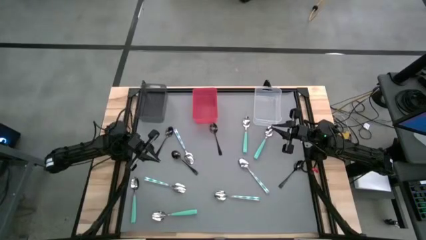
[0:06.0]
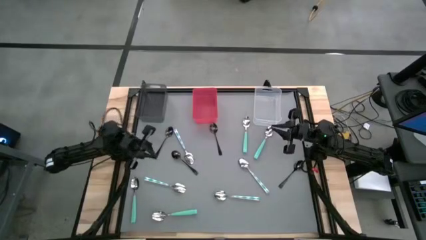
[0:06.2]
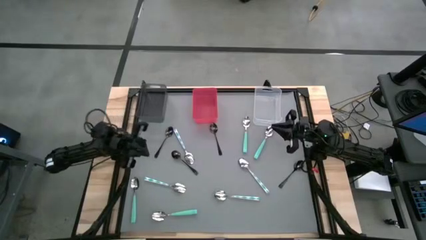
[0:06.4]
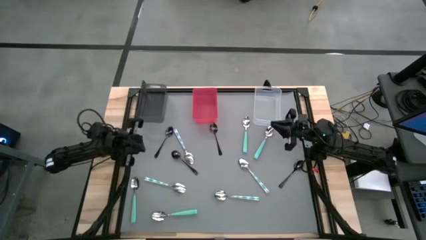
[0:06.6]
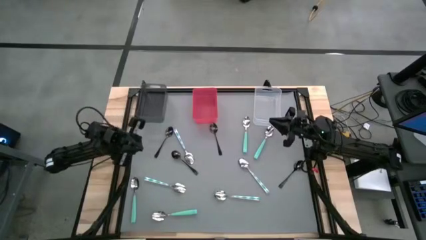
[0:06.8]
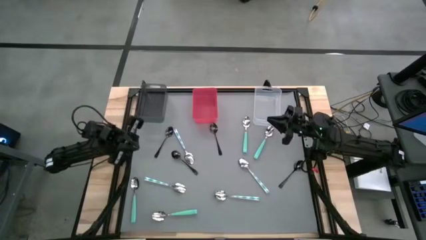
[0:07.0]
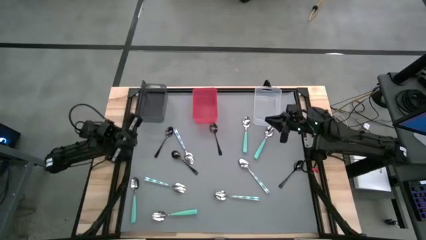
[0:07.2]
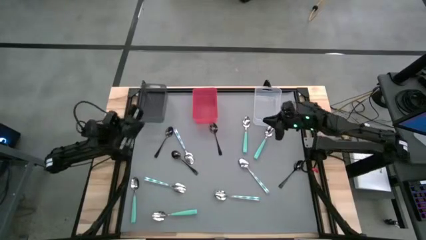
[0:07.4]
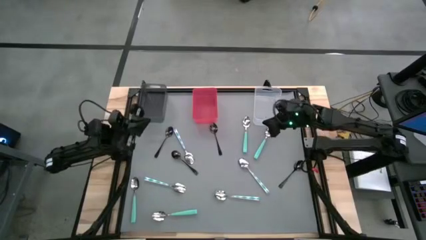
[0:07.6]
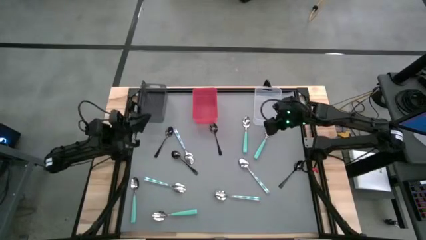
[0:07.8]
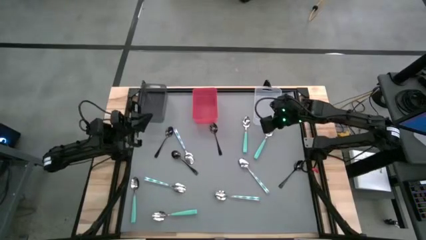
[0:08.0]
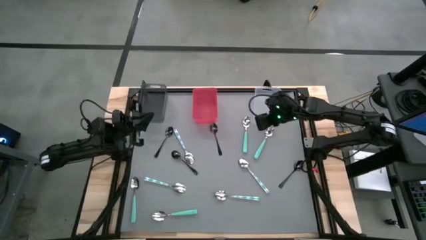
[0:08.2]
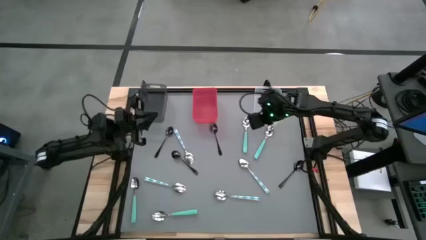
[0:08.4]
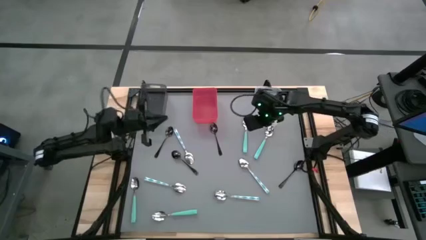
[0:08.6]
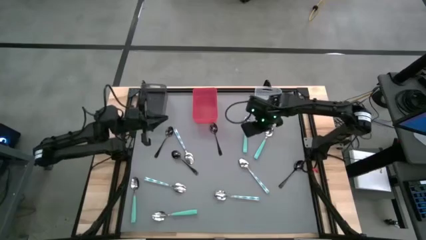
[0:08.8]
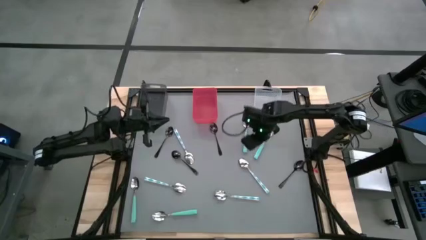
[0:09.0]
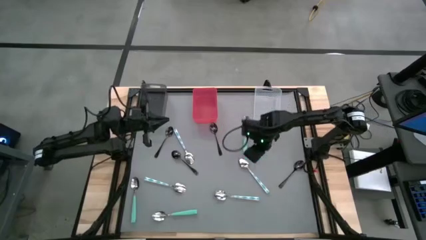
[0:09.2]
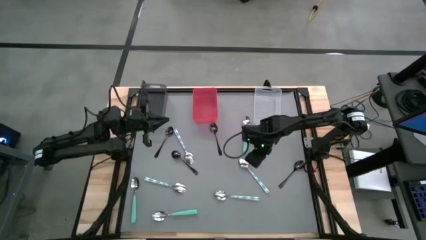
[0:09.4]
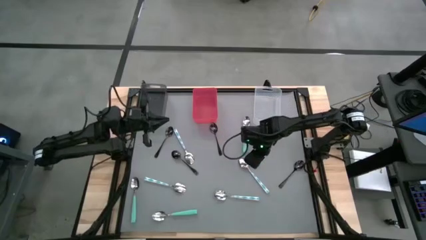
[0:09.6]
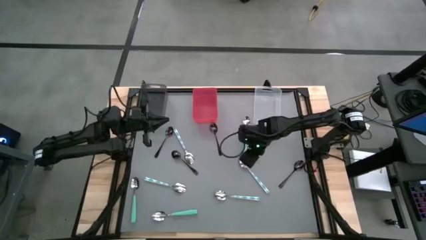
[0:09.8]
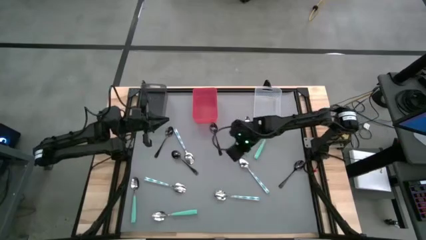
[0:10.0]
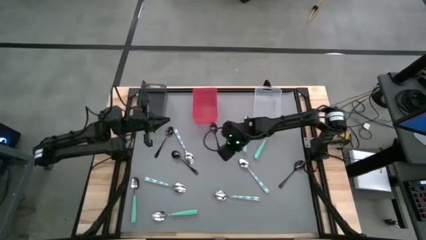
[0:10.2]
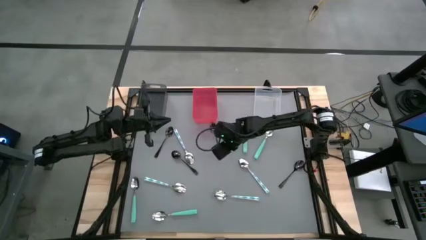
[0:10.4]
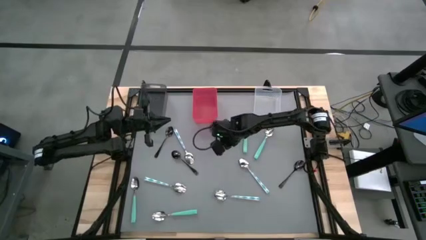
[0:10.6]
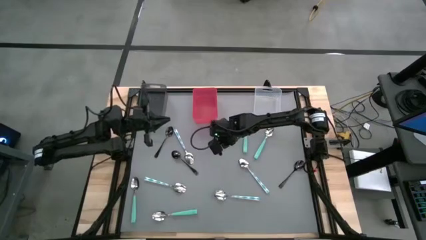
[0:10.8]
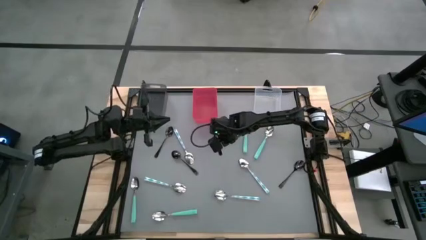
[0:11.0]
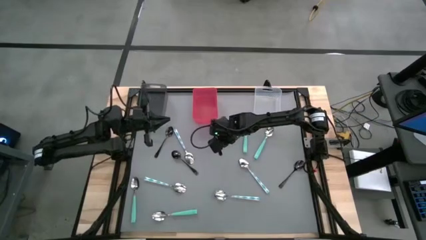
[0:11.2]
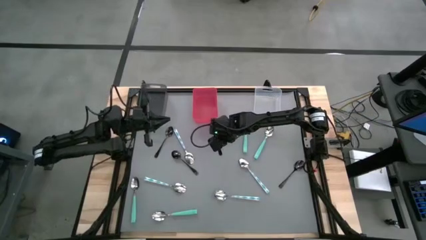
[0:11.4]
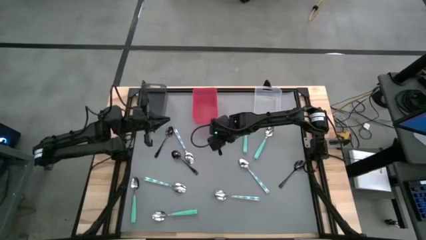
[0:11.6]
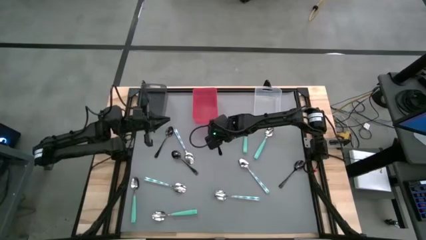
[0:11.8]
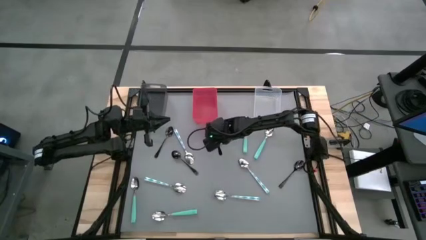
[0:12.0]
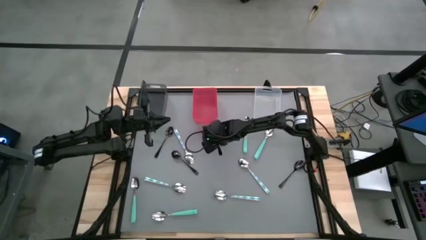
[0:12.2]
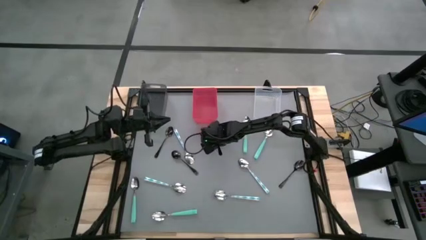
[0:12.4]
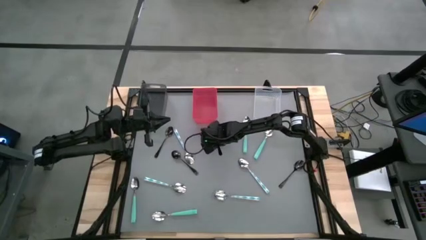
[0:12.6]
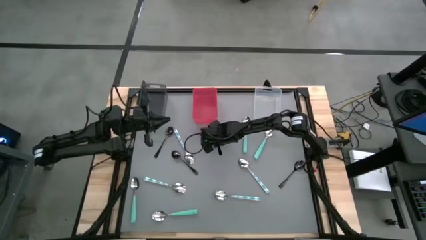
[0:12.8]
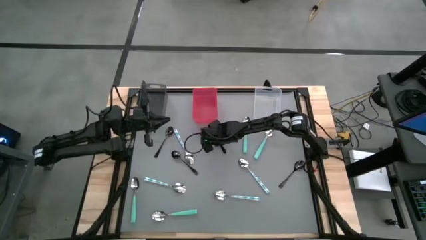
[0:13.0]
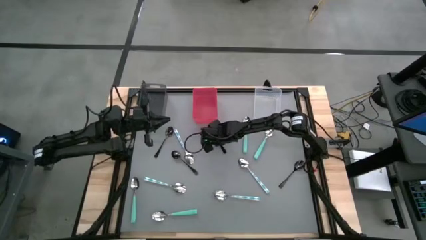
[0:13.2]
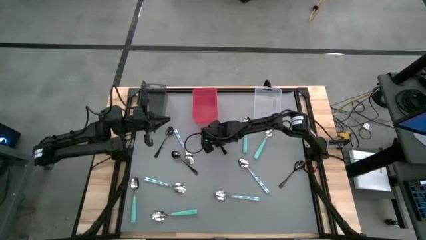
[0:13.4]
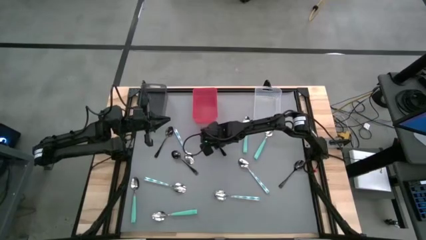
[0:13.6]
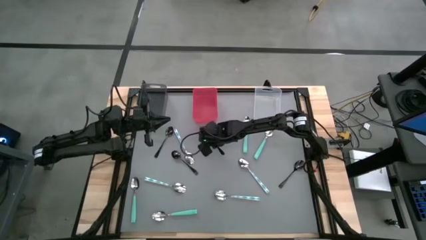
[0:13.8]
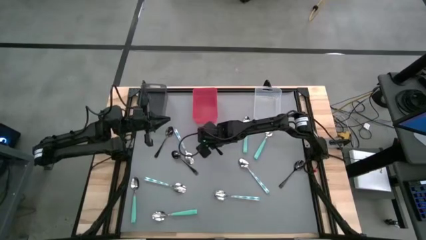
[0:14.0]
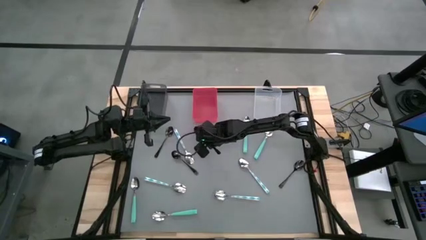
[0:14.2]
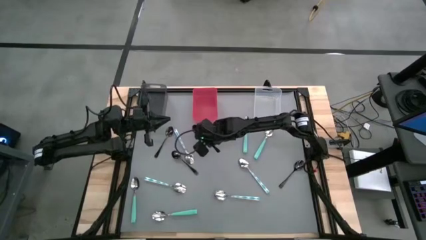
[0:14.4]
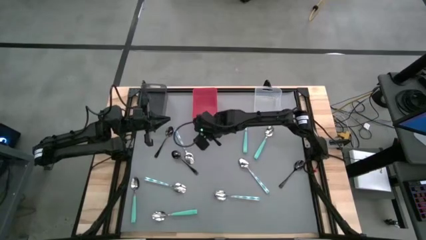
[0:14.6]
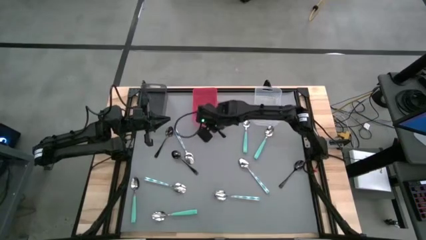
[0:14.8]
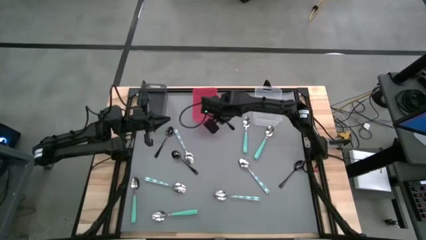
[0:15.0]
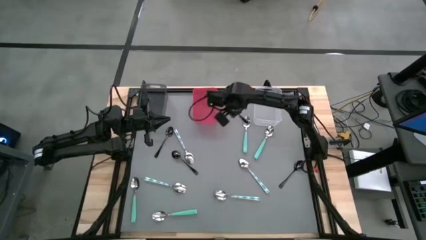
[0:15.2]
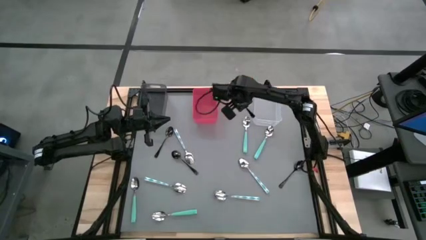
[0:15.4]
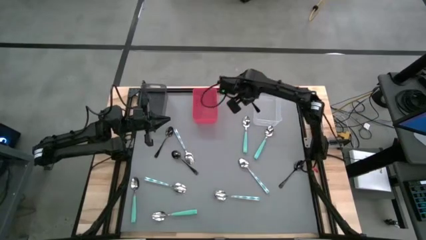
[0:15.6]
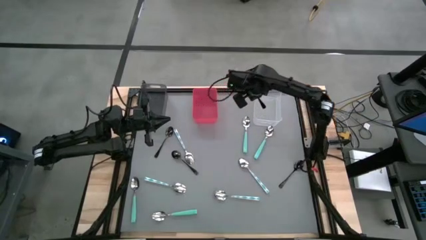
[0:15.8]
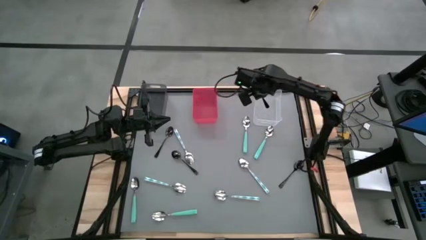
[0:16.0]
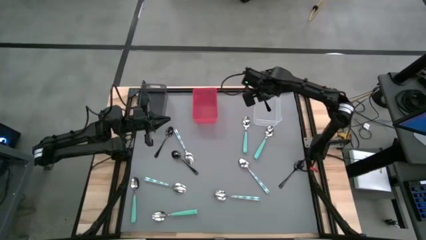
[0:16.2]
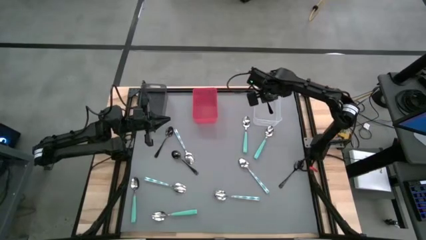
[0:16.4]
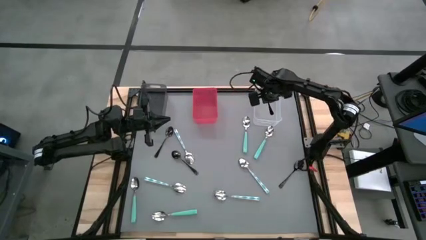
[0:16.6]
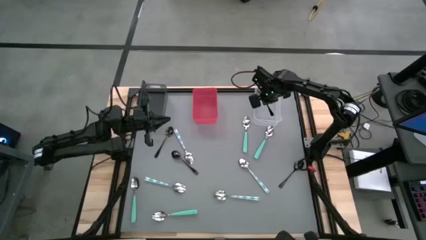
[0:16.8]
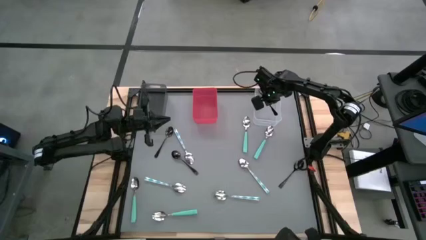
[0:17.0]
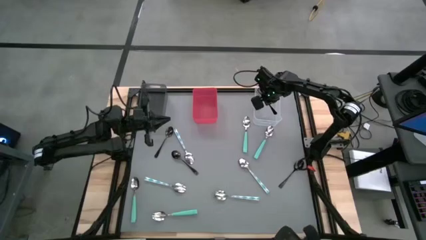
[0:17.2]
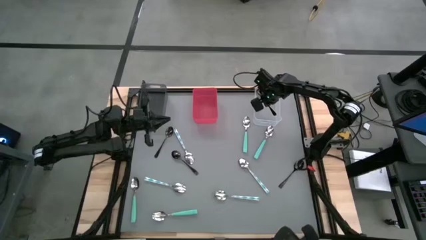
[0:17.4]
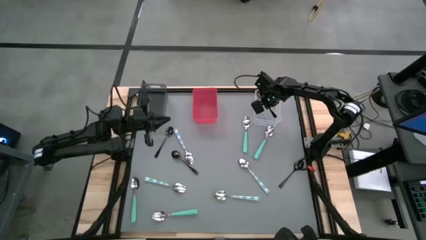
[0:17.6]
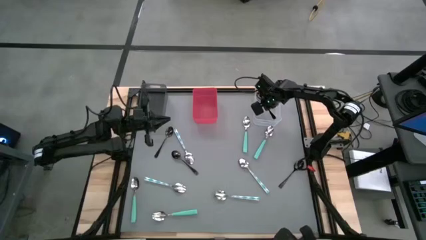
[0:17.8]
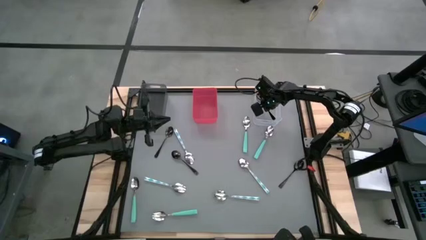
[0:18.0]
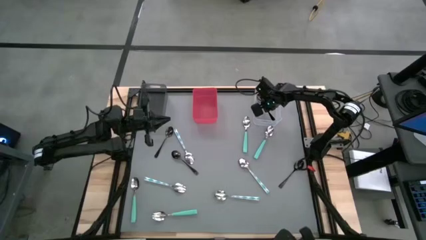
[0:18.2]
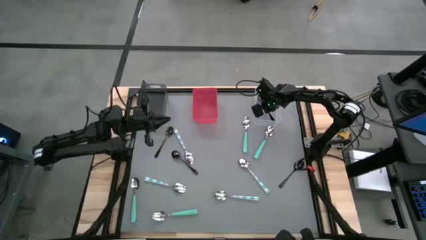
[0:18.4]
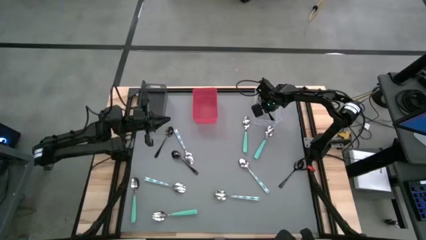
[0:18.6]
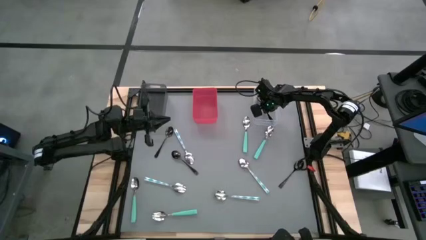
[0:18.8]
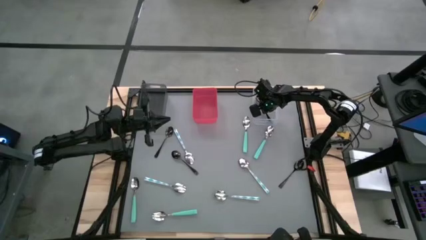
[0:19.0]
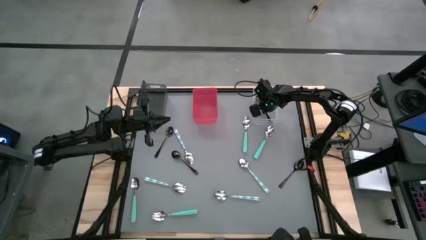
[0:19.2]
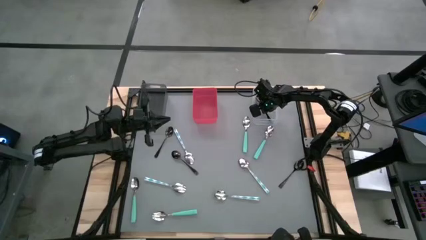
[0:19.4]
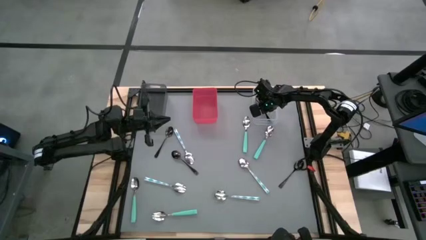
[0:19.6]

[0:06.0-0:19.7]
Task: Sort silverware by color (type)
Put the black spoon into the transparent bin
